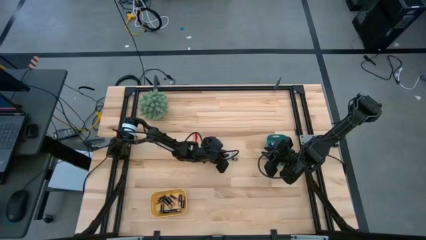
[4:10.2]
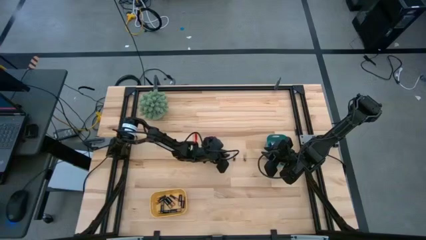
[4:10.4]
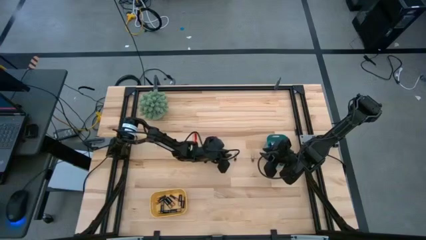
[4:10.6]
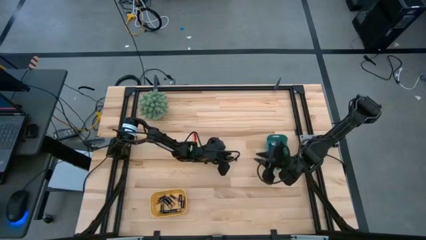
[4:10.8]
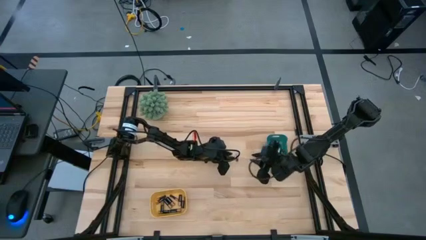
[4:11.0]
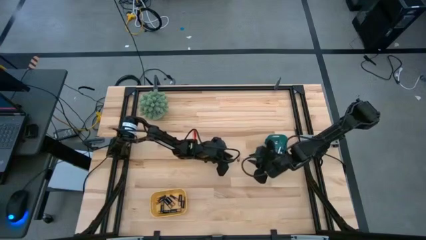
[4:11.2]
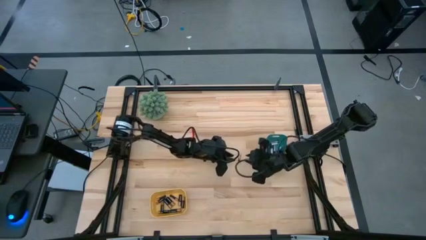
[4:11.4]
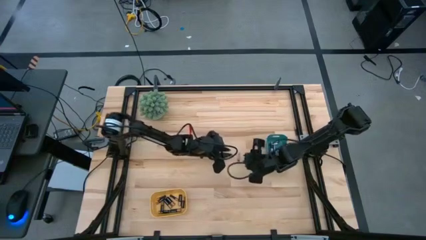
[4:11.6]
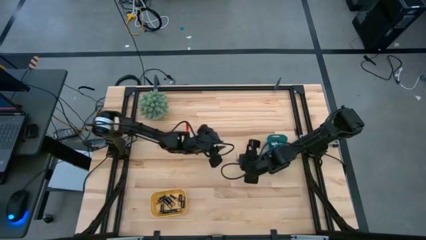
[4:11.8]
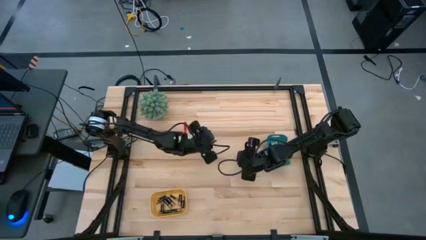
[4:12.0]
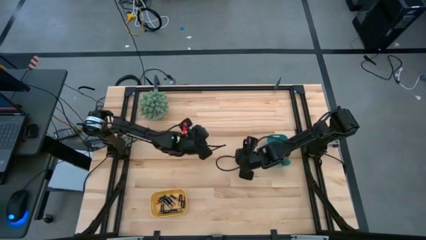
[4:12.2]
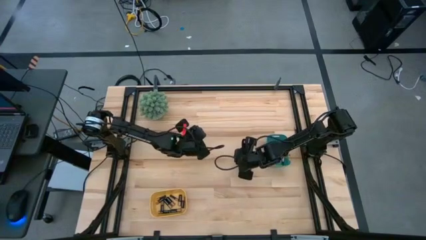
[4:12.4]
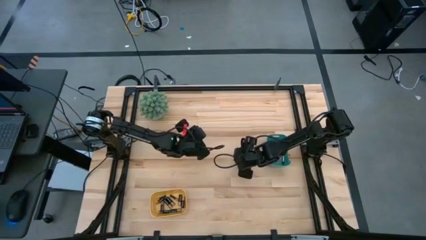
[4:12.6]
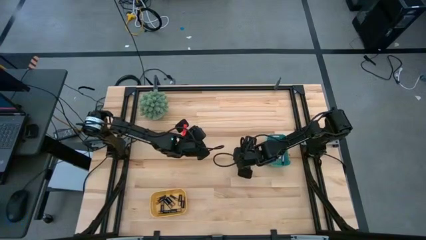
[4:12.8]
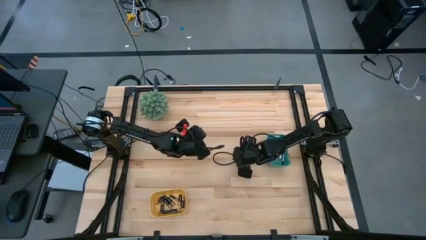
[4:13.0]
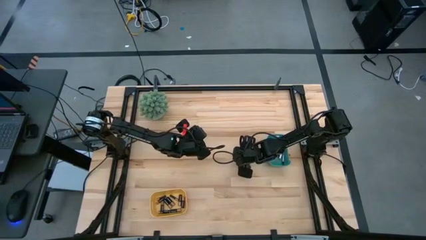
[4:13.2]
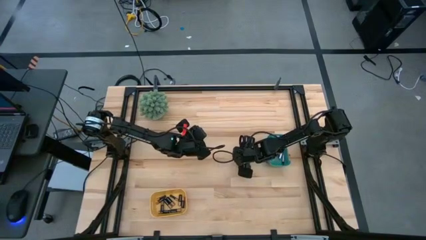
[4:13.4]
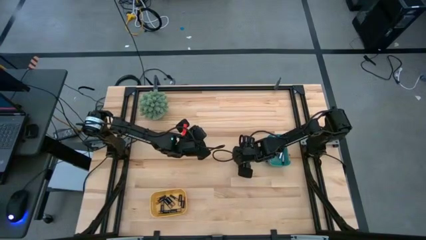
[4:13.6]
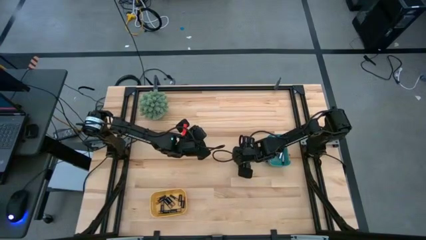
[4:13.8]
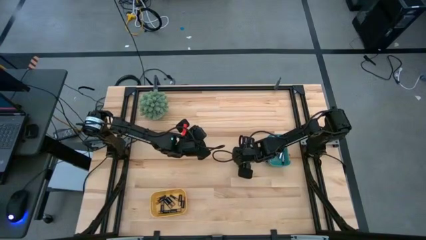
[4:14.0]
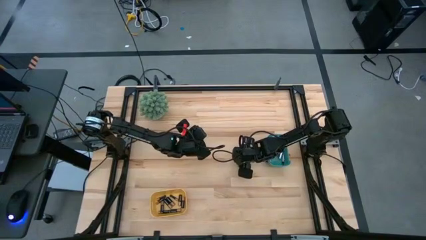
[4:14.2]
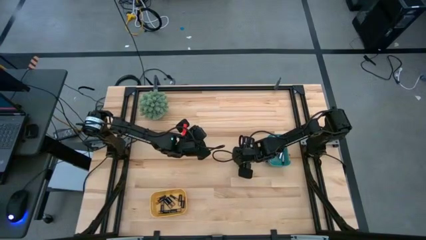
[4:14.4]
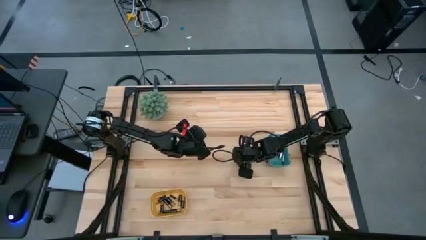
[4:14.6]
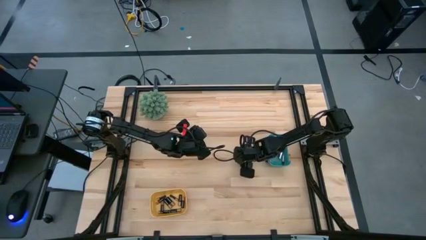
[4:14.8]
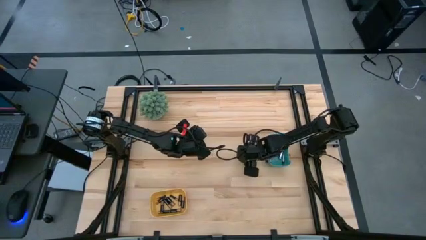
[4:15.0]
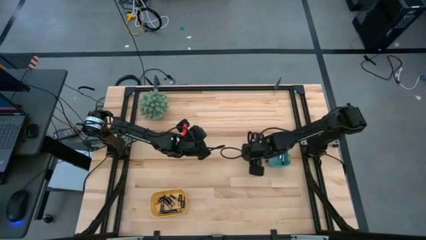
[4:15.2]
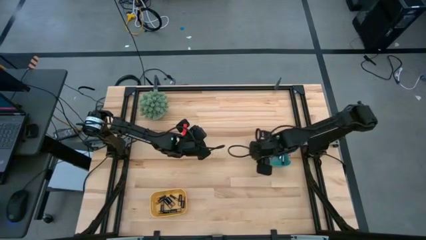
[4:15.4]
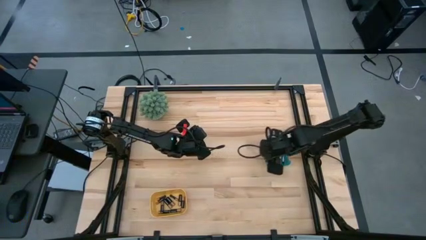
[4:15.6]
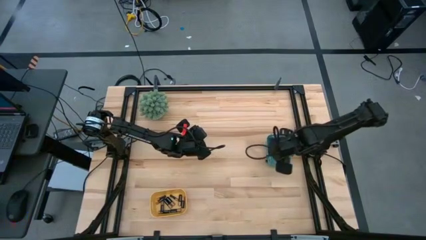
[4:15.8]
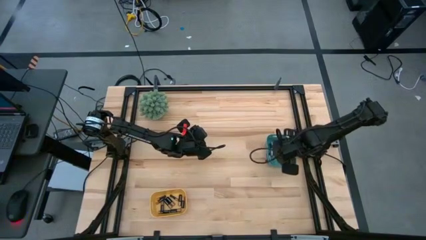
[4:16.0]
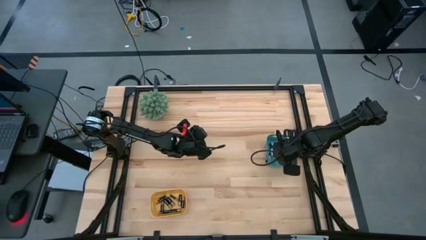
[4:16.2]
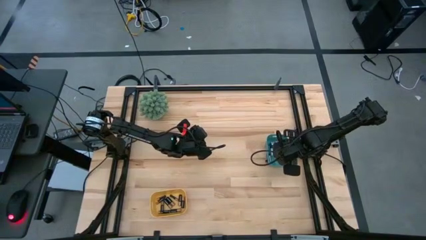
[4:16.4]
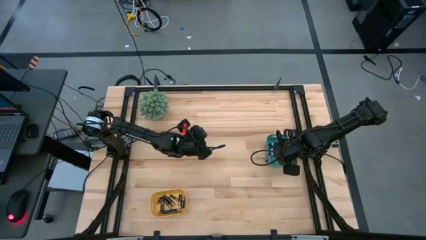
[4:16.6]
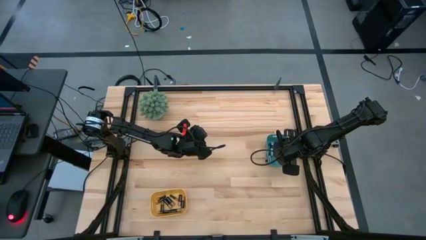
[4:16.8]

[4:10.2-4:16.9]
Task: Sort batteries
Put the silver battery into the green bin

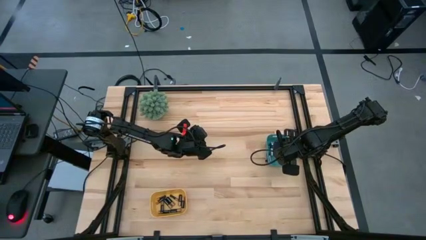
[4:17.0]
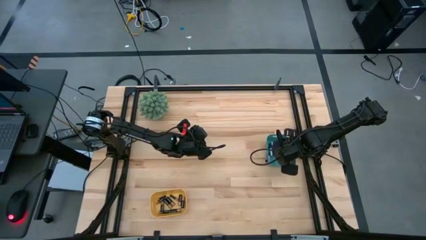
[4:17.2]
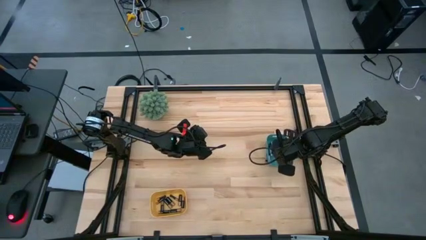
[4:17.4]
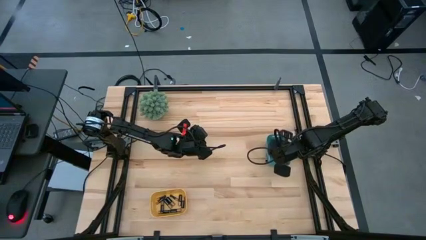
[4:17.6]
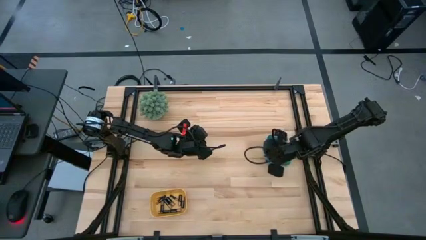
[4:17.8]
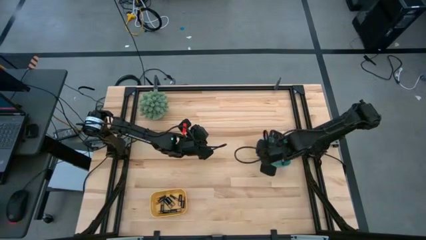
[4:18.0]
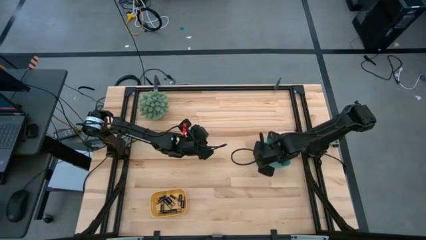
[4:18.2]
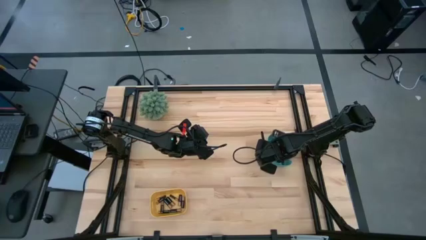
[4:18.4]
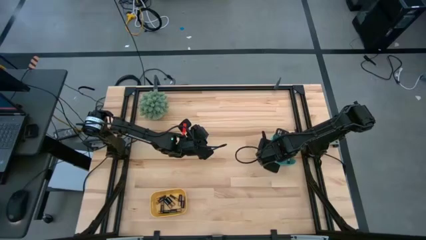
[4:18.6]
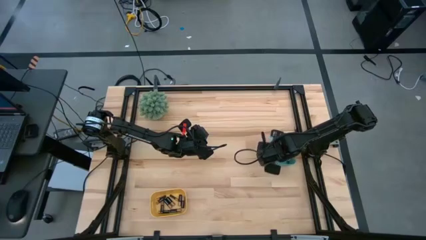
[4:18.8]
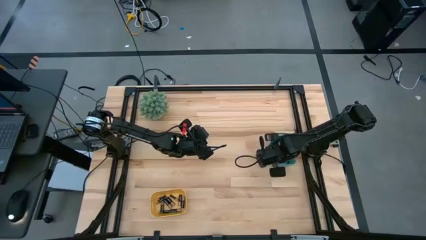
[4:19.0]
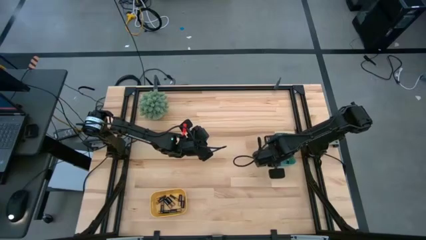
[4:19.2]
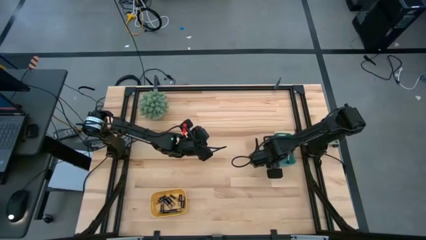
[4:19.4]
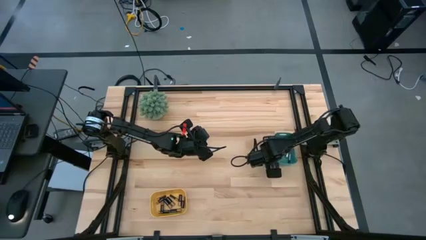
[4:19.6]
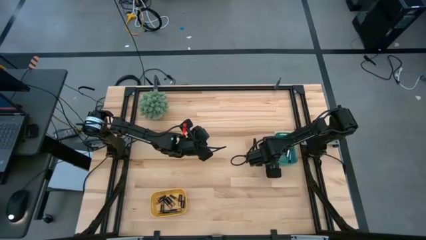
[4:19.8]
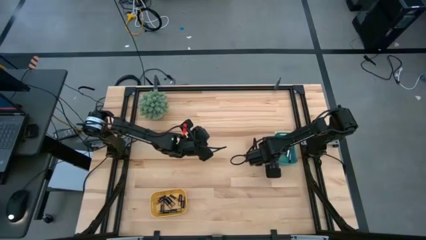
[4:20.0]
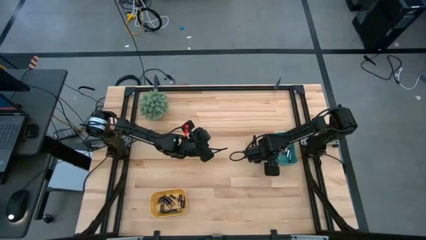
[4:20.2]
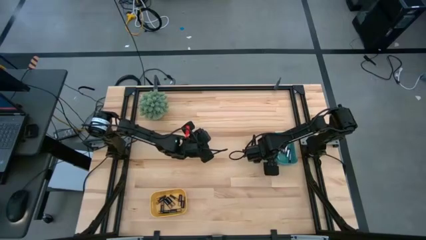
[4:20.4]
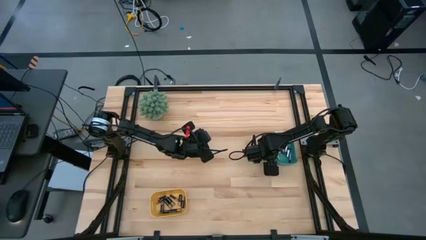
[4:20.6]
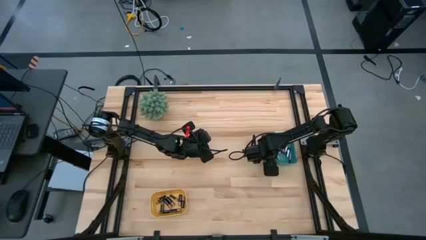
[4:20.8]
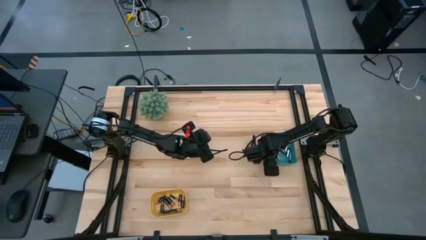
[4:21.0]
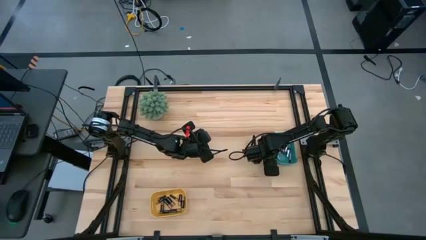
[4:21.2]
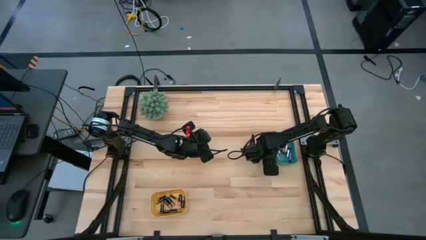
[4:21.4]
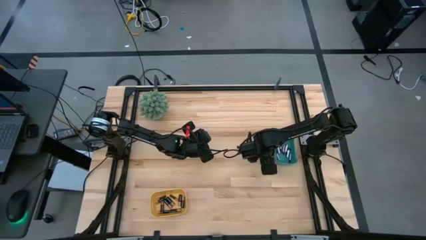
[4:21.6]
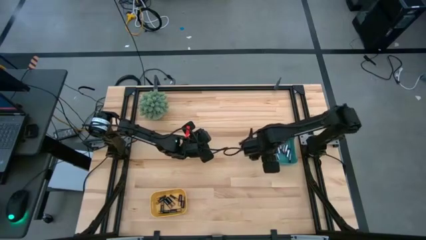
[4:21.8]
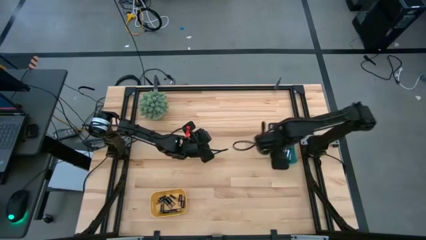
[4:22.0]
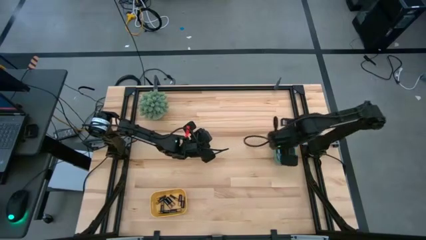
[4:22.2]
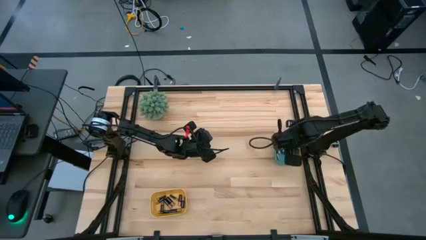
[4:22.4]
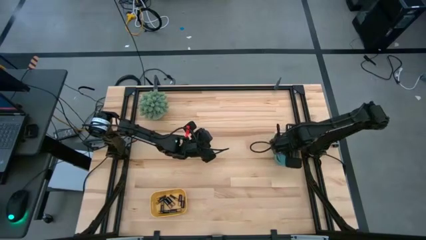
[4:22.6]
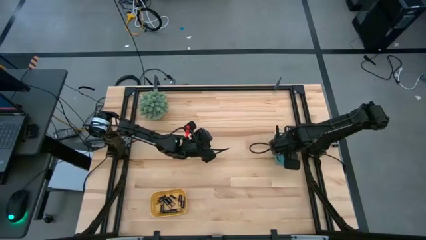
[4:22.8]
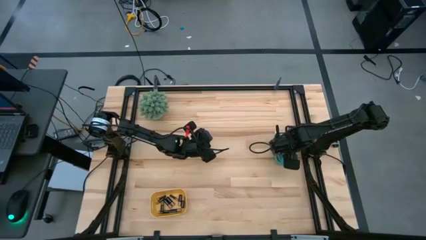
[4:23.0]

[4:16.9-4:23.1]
Put the silver battery into the green bin
